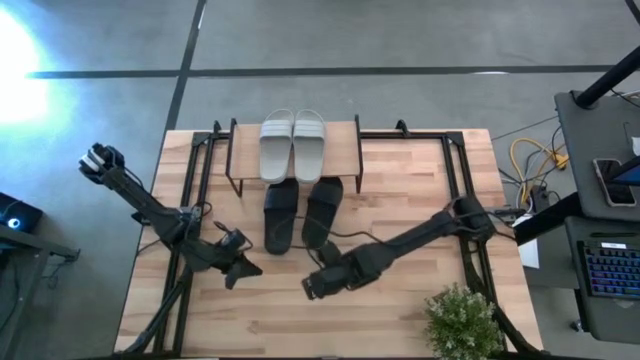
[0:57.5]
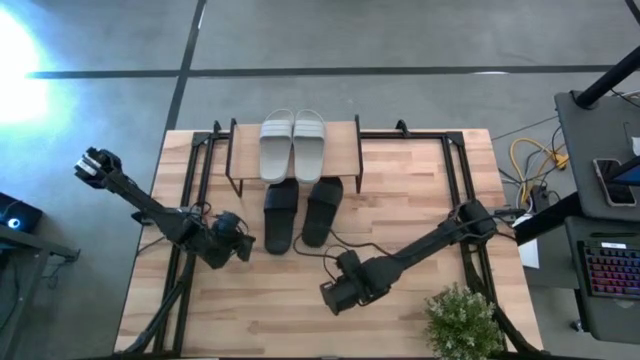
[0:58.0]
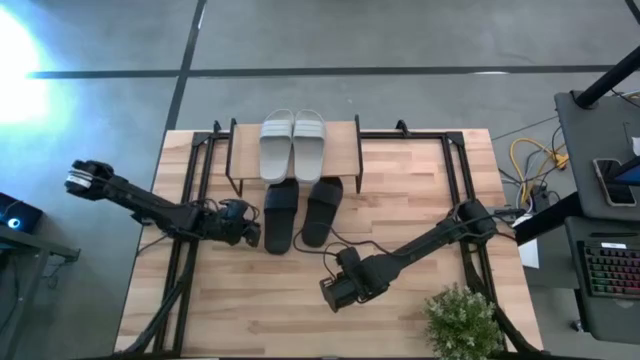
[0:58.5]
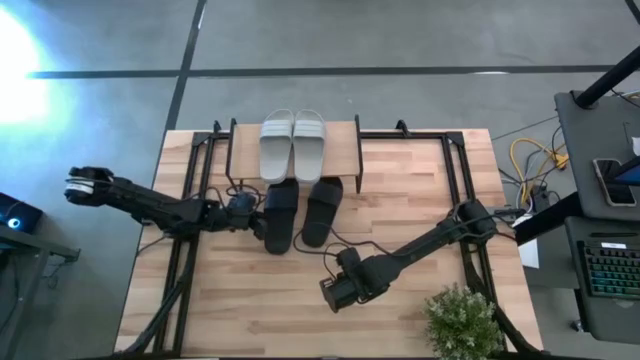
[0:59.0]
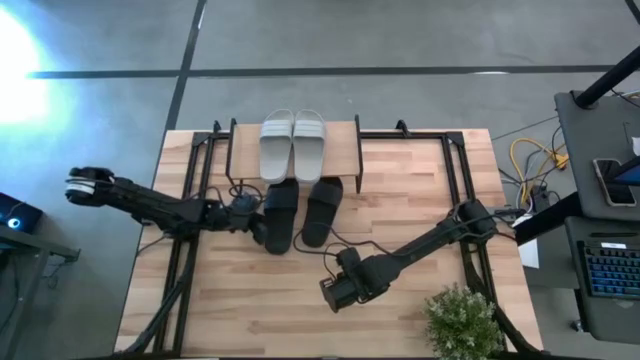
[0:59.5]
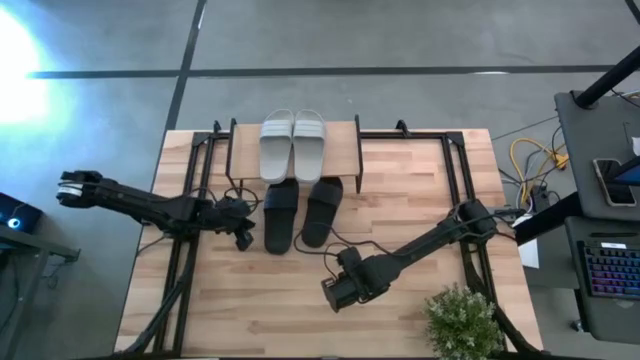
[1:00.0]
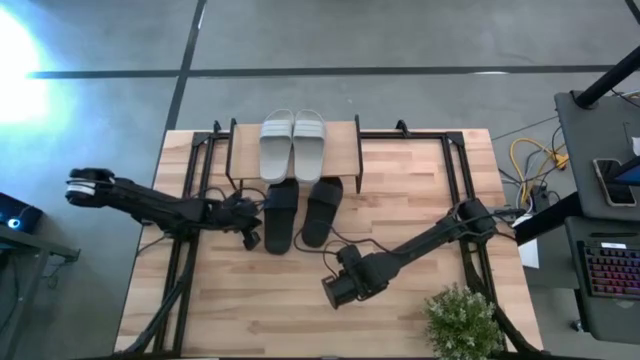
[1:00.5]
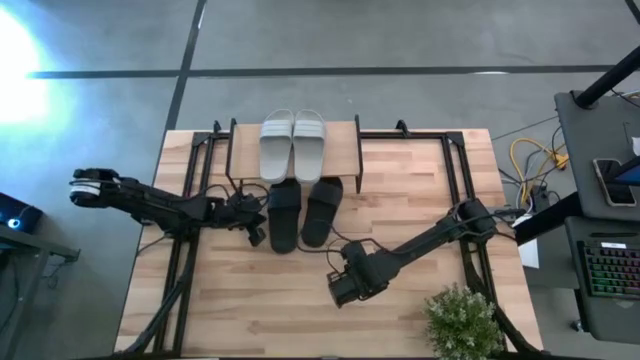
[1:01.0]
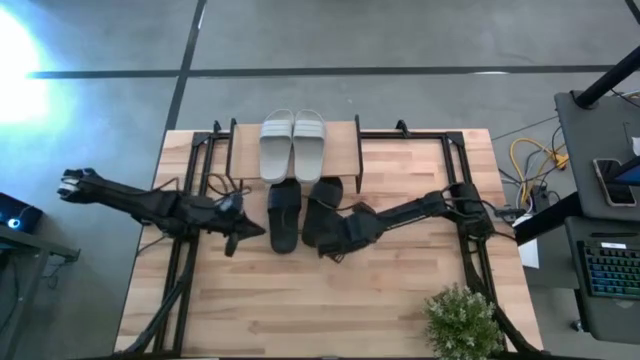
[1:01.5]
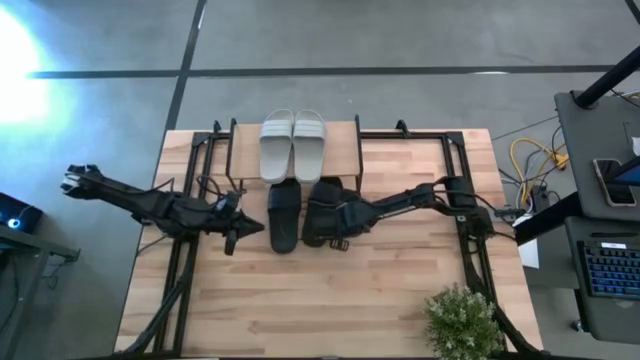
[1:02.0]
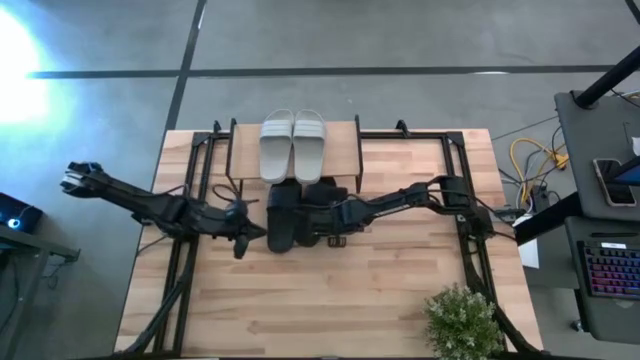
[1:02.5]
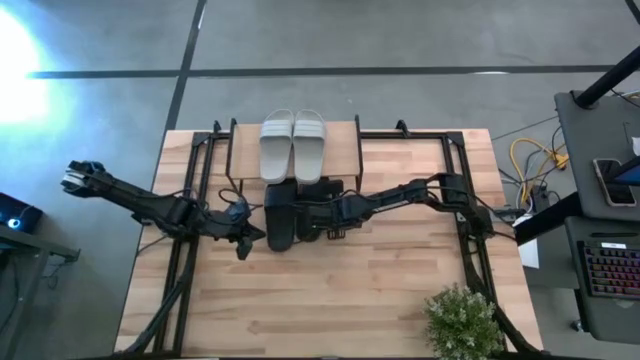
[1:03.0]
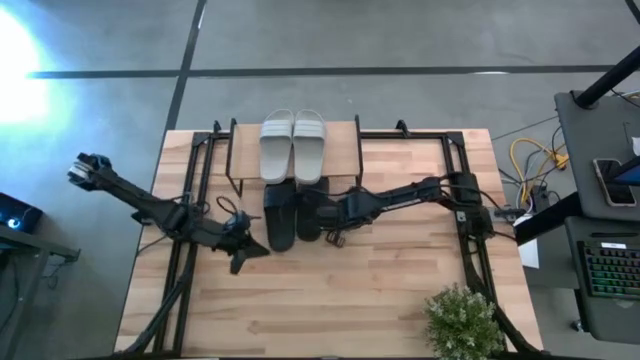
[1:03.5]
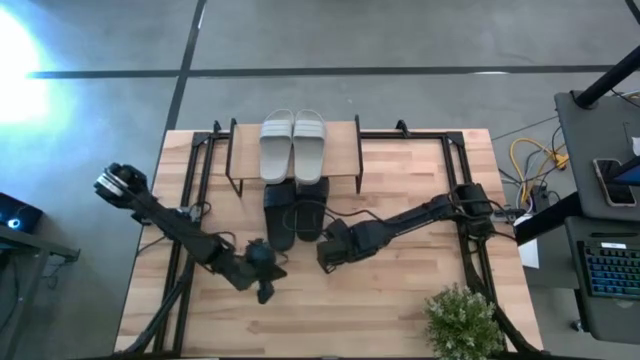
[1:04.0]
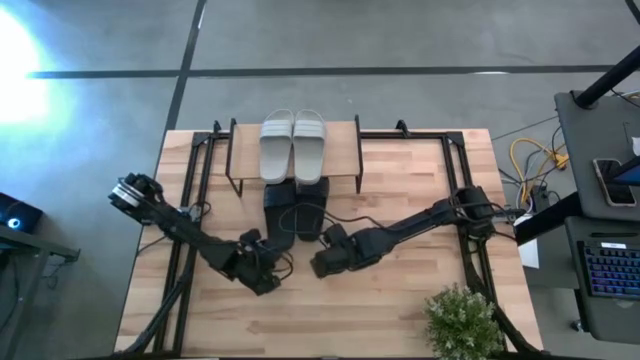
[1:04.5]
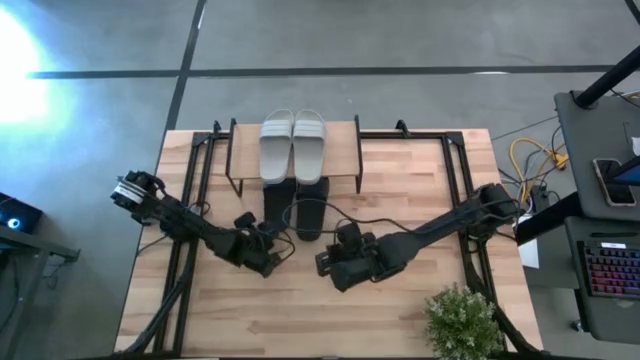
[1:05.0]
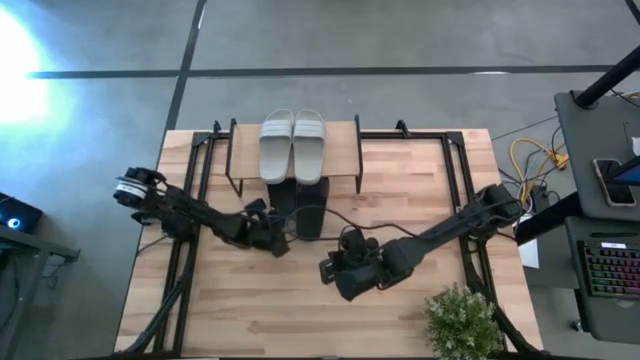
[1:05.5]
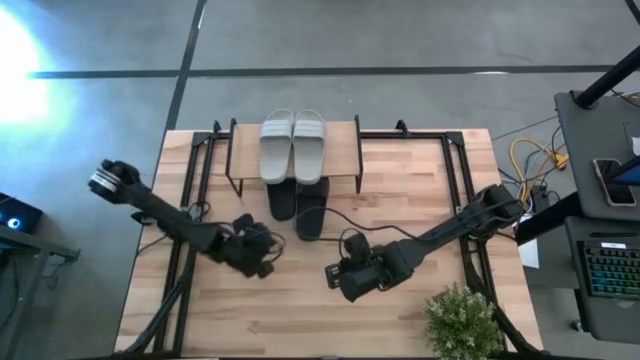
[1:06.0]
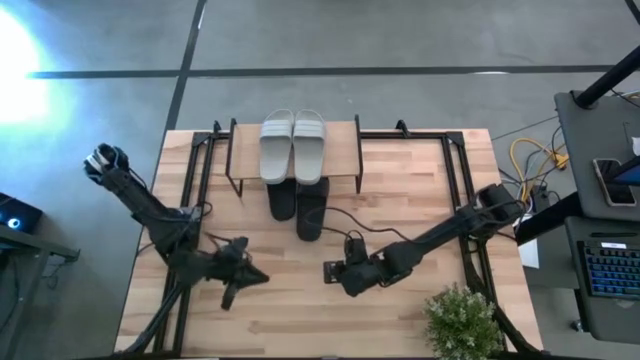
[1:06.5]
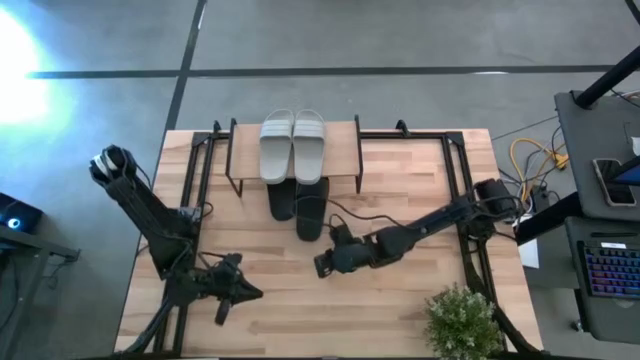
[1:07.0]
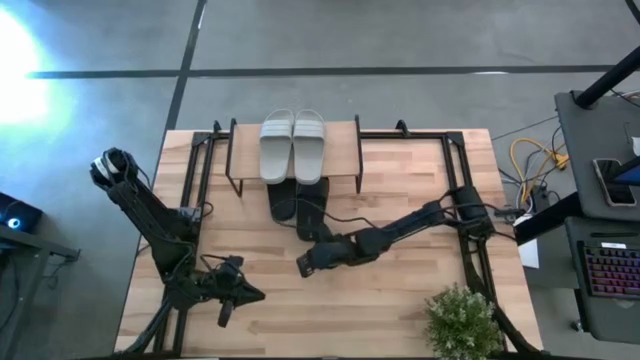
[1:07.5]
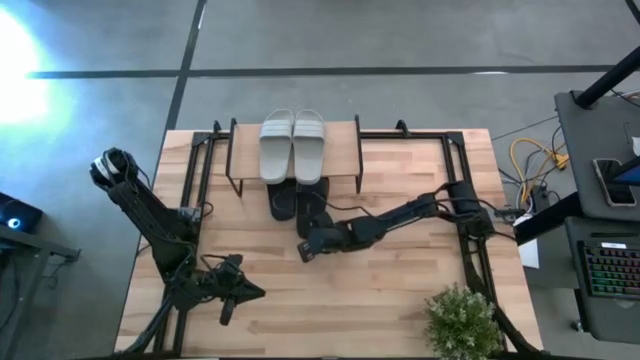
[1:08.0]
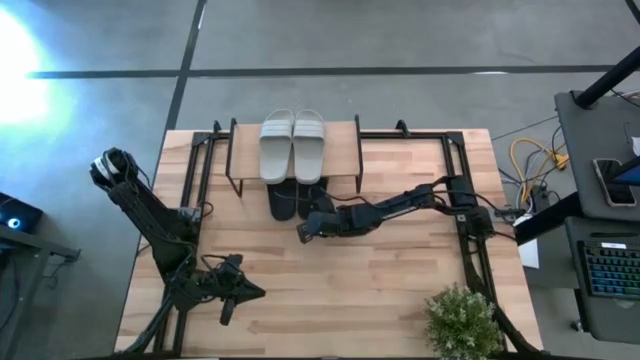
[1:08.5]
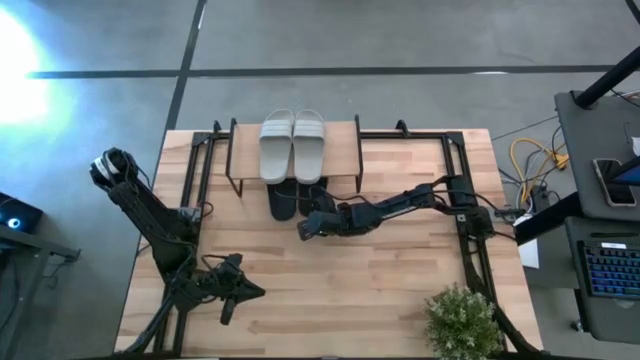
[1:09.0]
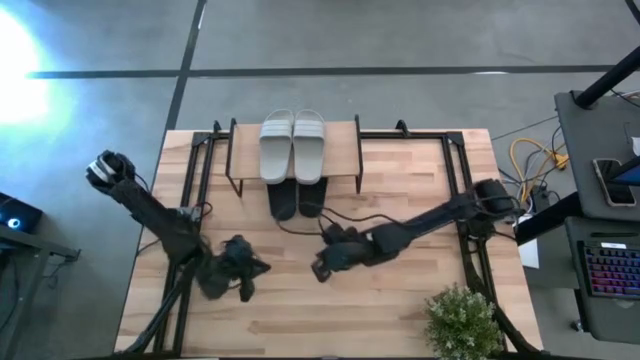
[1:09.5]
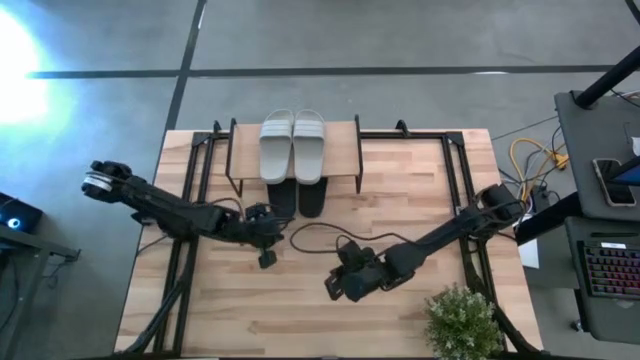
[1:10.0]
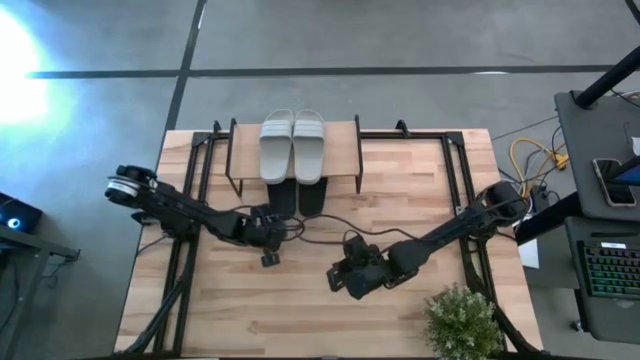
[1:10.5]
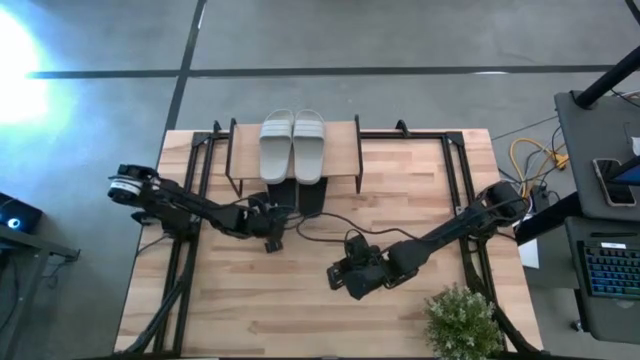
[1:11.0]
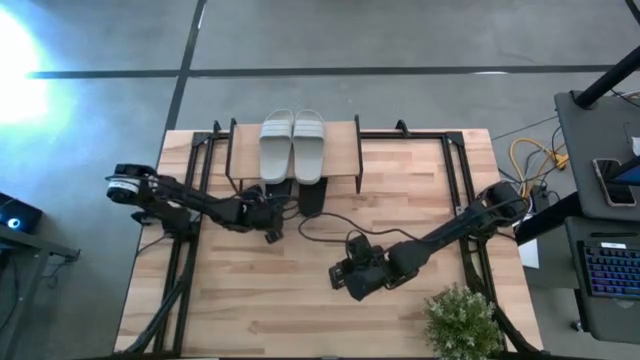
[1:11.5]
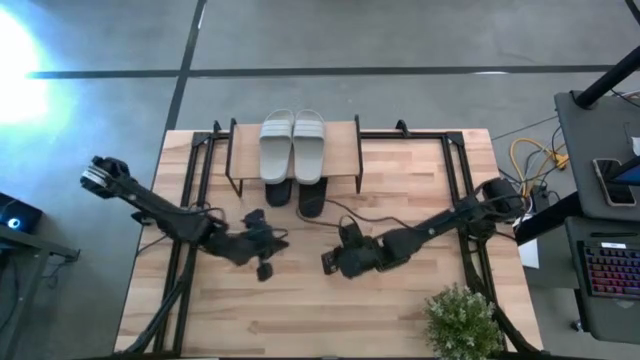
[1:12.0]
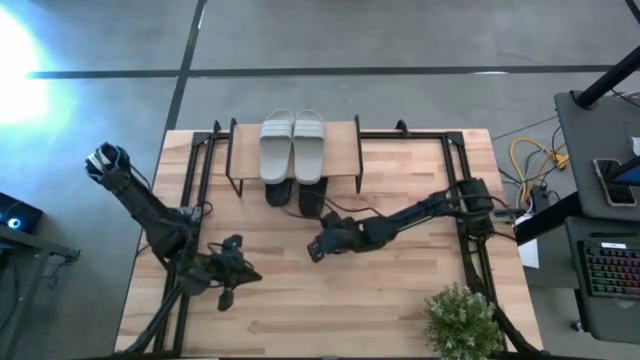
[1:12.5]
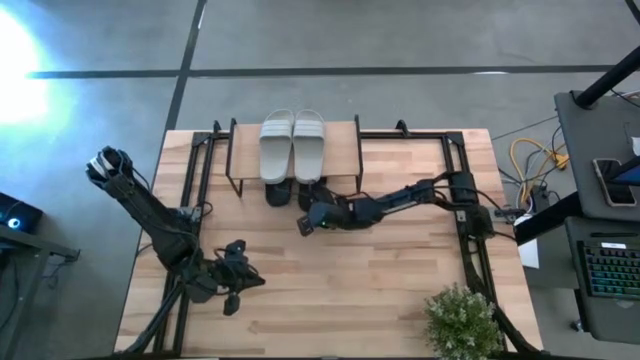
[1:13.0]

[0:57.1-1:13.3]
Task: Pick and place slides into the shelf
Adjust the left and right black slides under the shelf

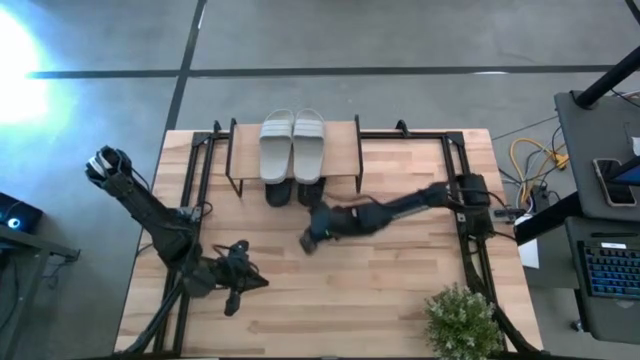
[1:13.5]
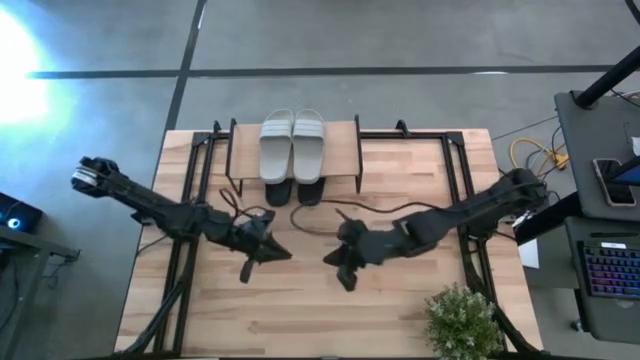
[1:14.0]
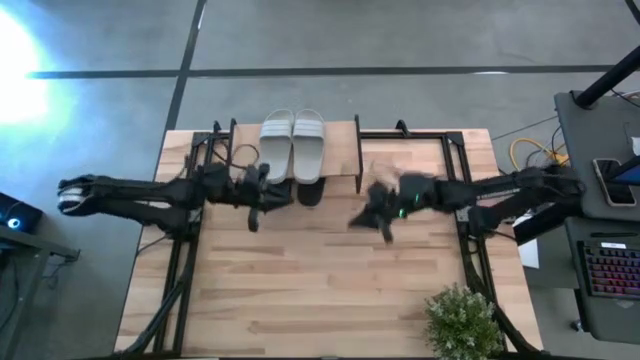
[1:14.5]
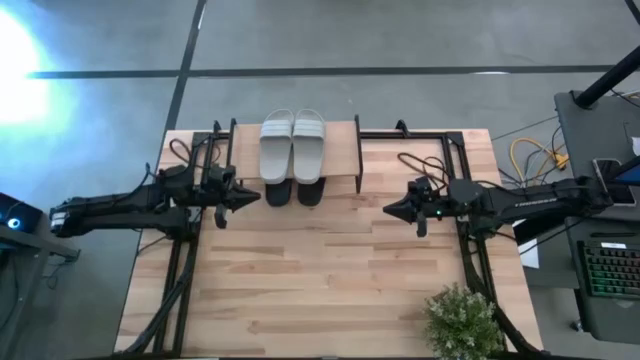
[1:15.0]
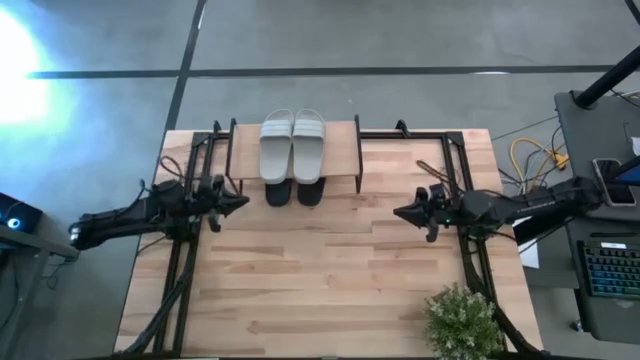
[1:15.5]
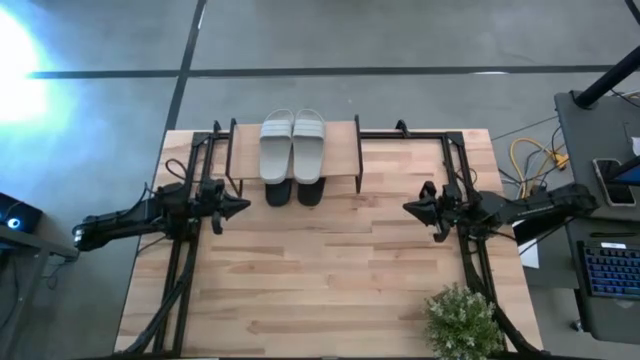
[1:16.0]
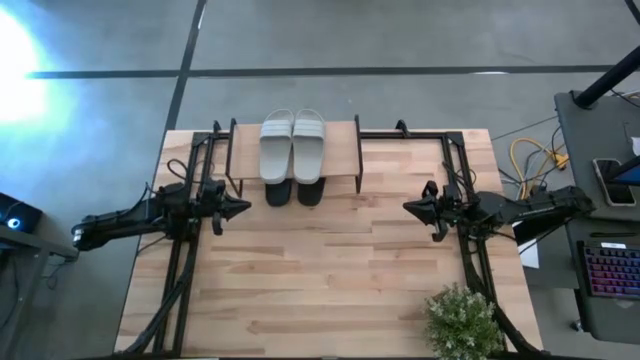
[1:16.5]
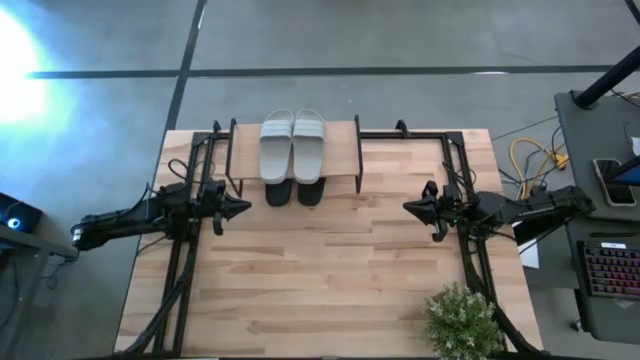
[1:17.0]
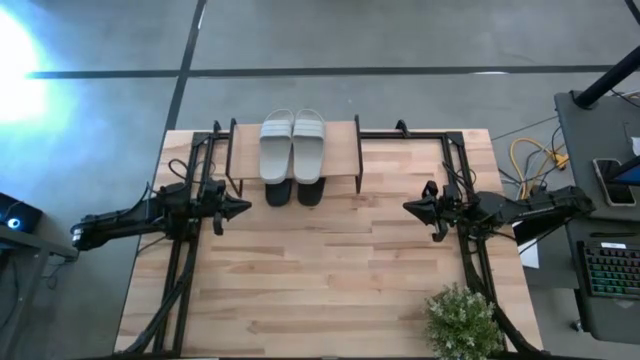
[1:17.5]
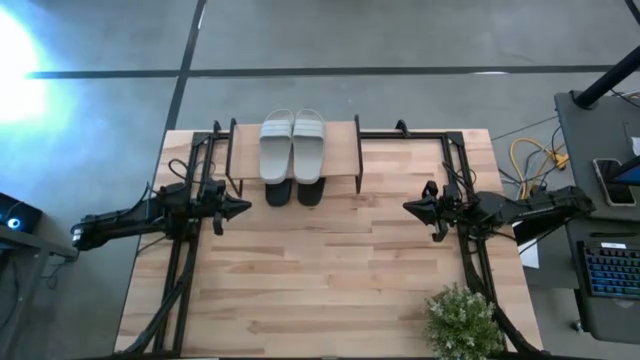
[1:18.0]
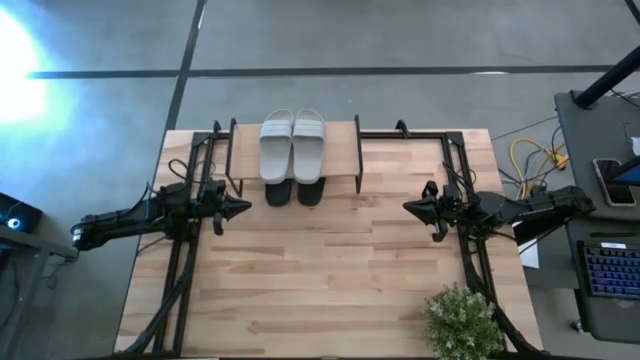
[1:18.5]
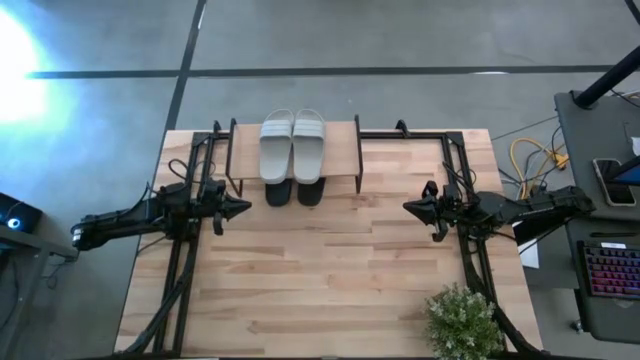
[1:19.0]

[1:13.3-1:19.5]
Return to Home Position
